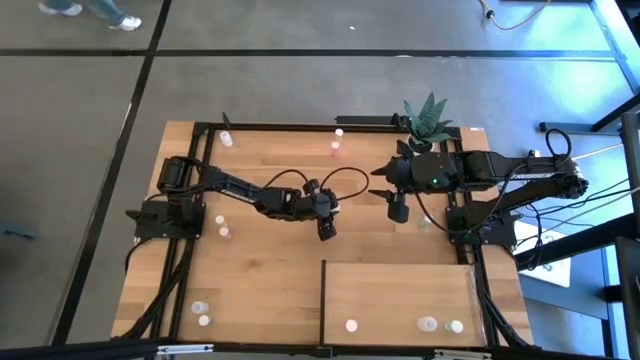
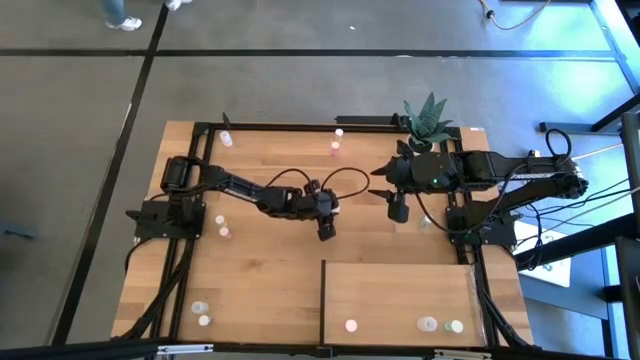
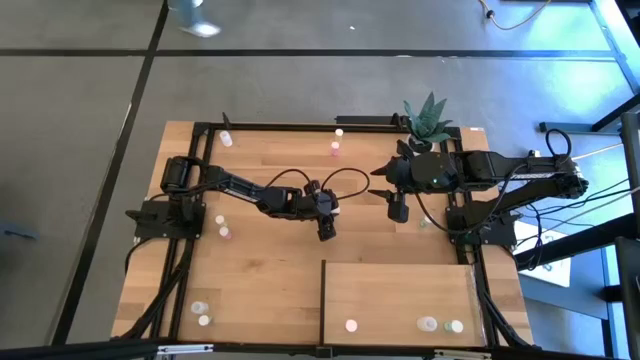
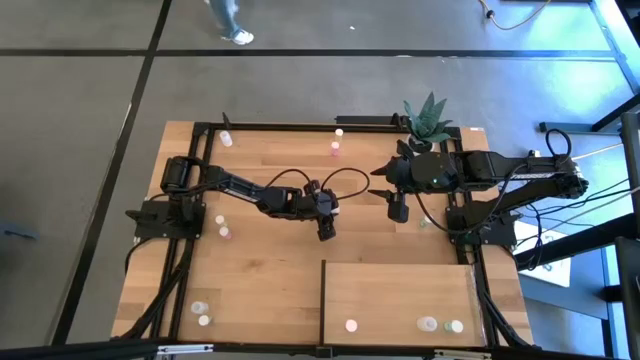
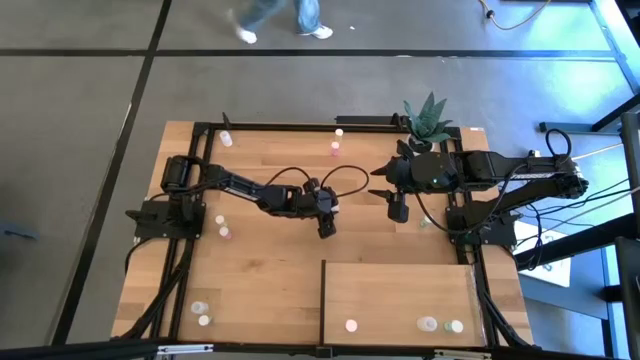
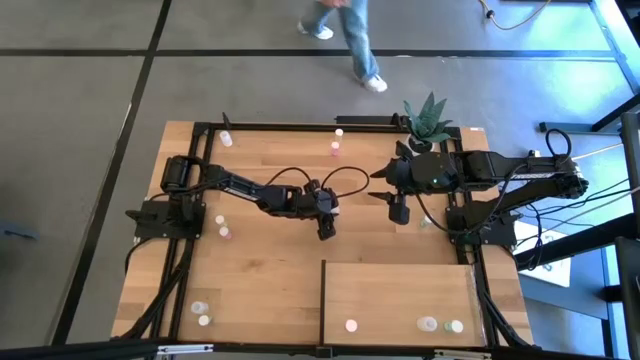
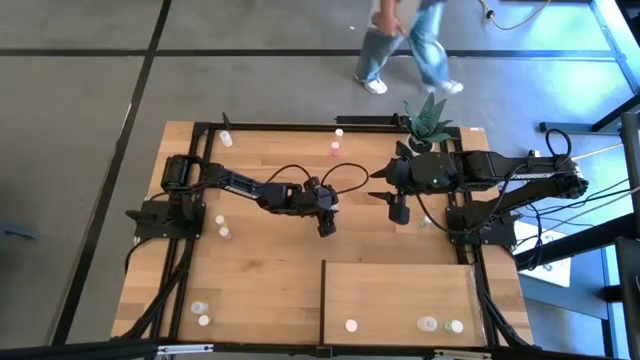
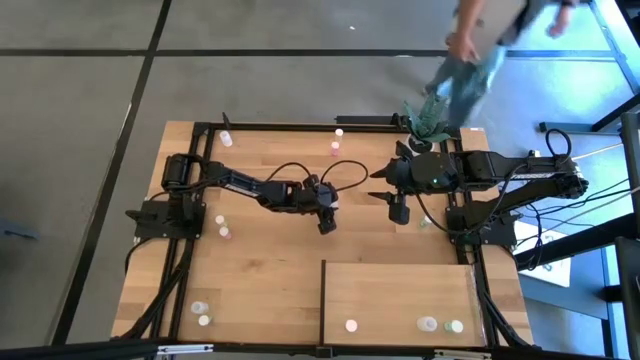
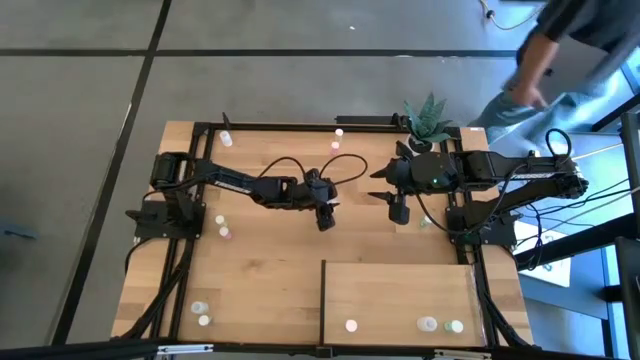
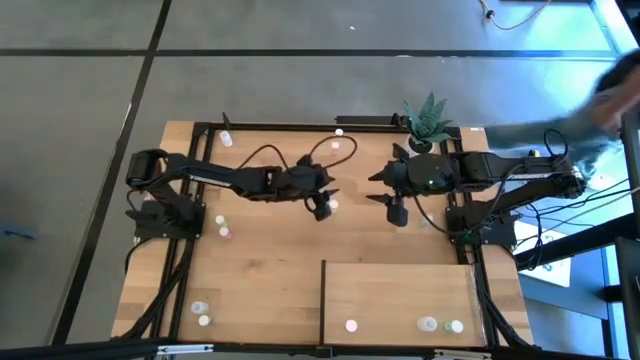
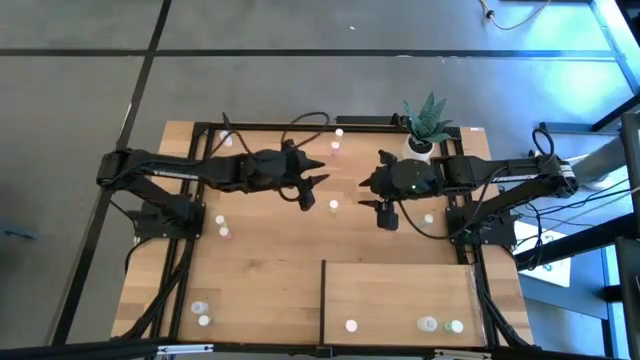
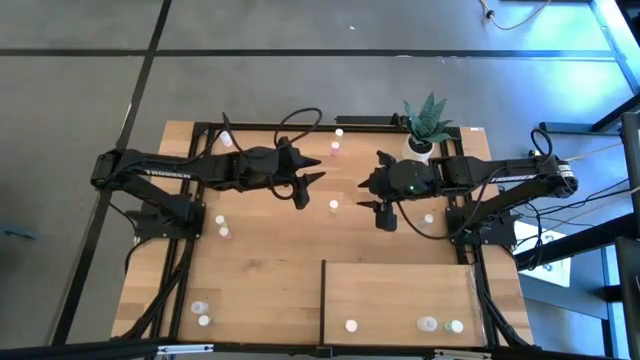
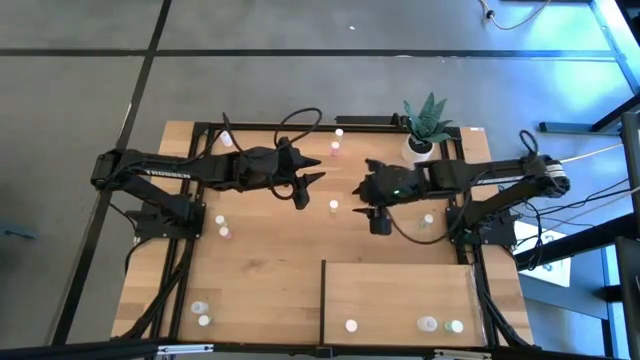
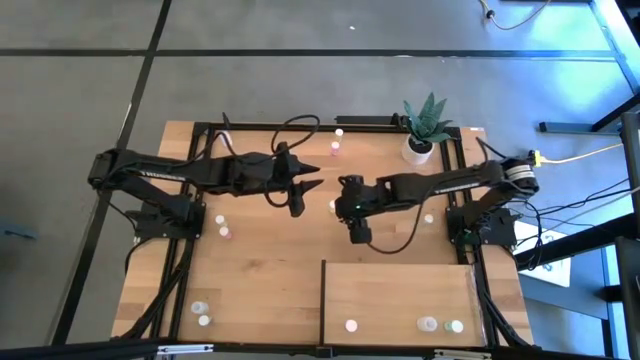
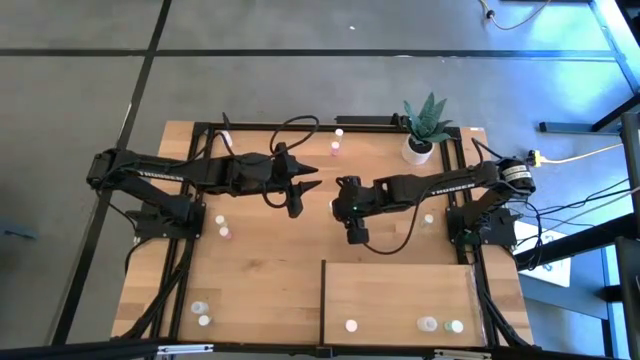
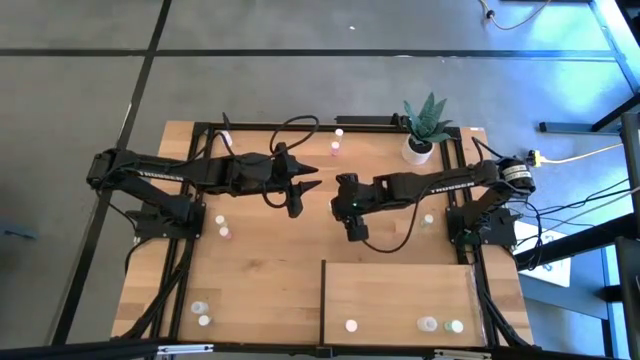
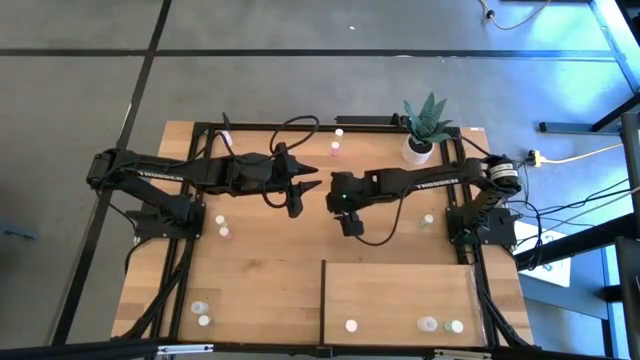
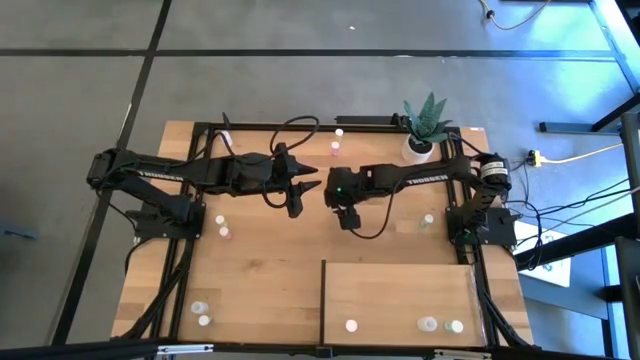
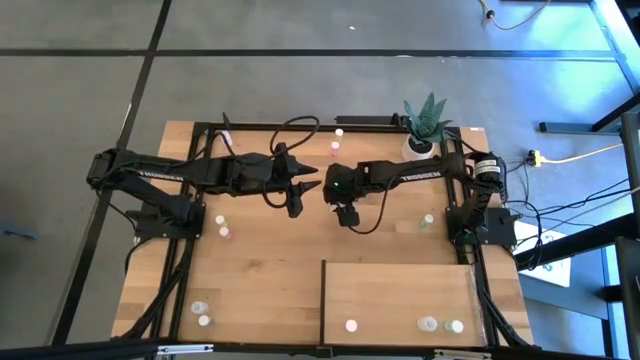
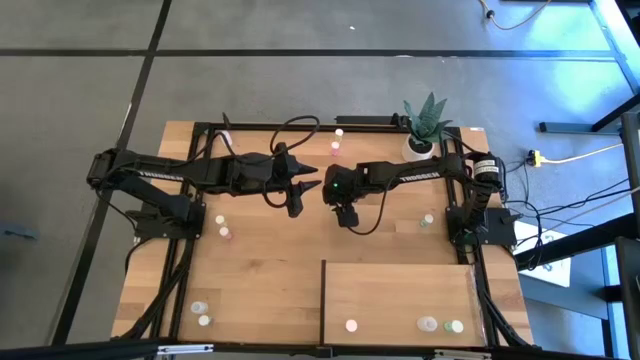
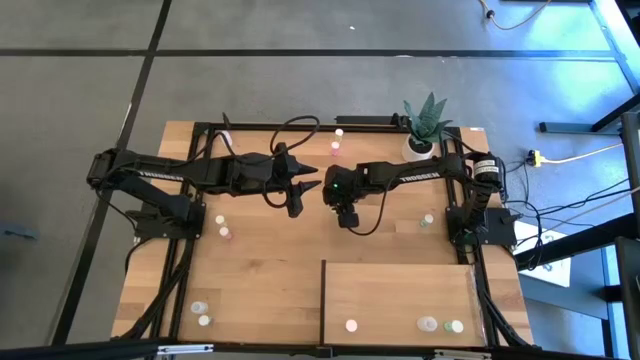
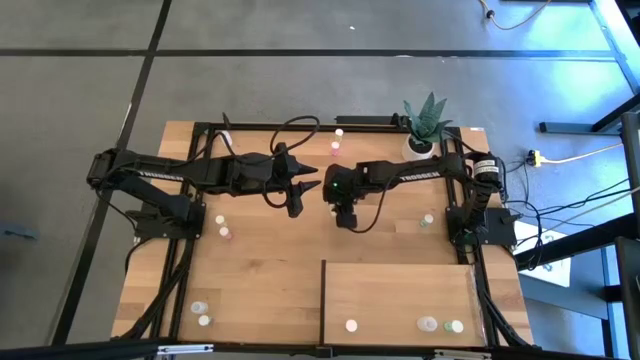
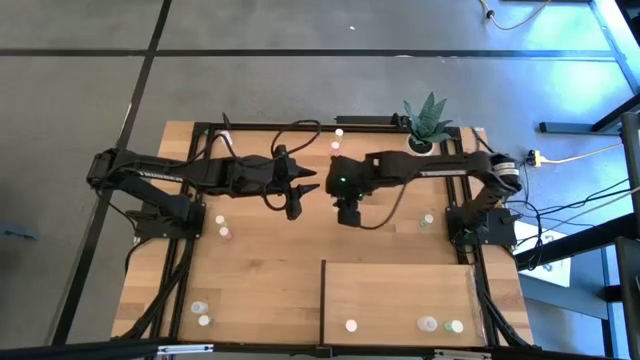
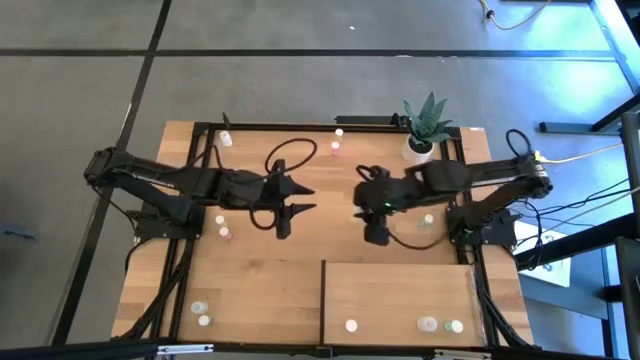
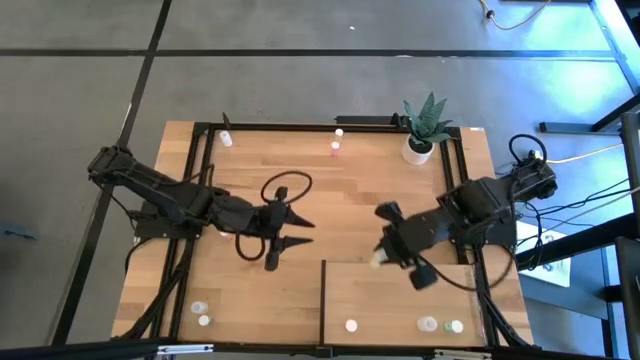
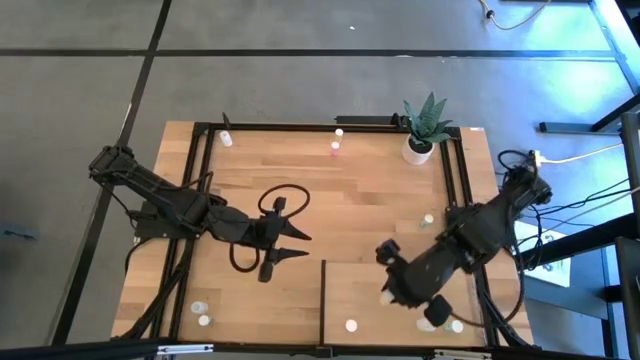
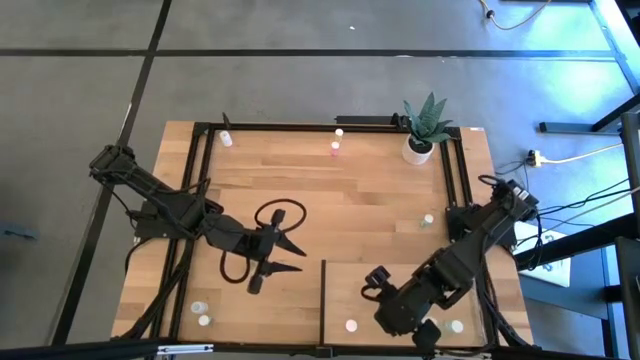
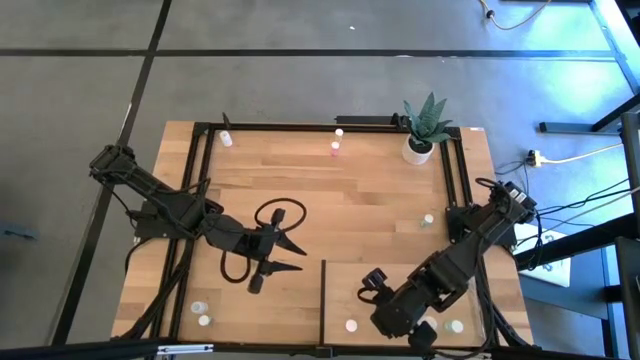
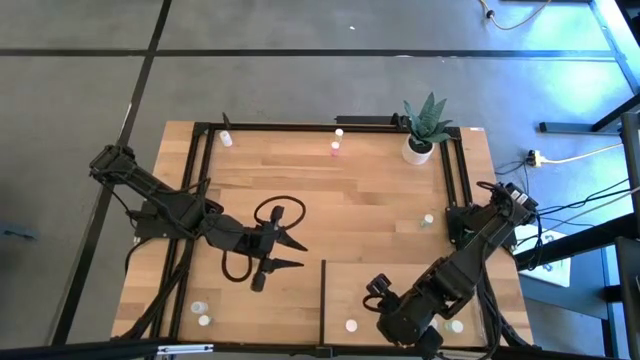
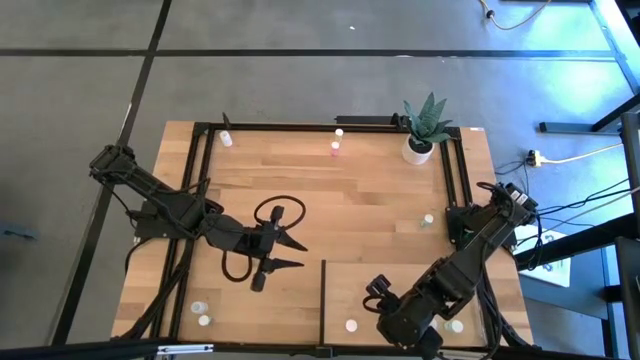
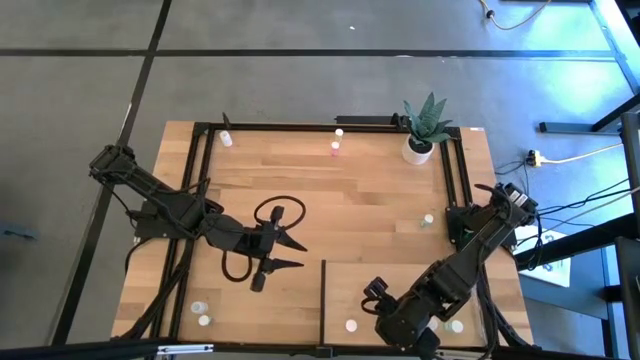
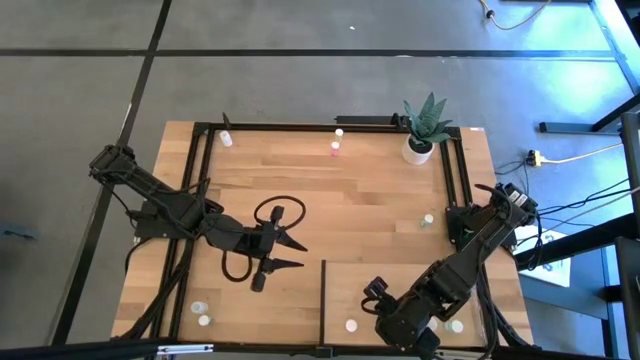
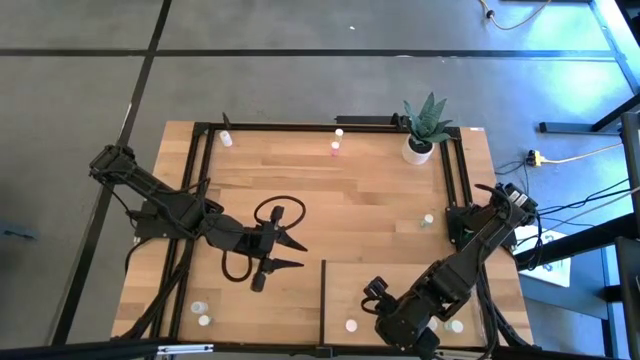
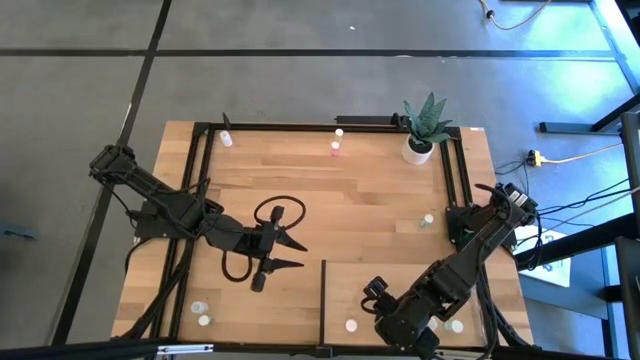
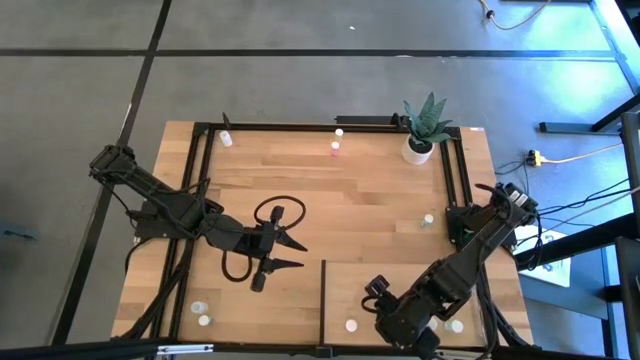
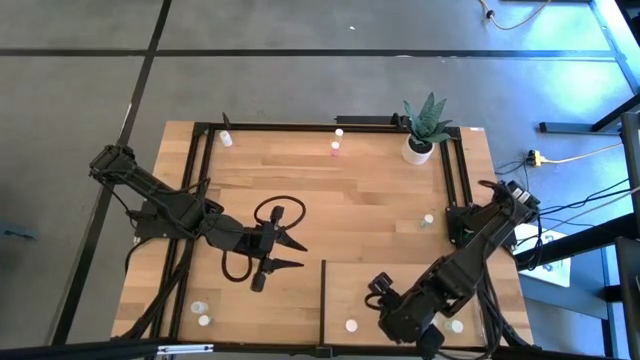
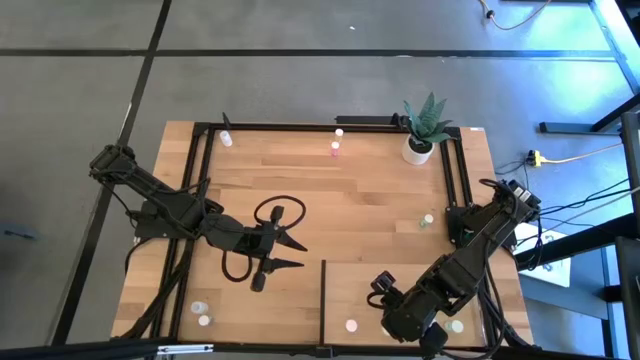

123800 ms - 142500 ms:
Task: Pick and place medicine bottles onto shelf by color
Put the bottom yellow pill bottle on the shelf

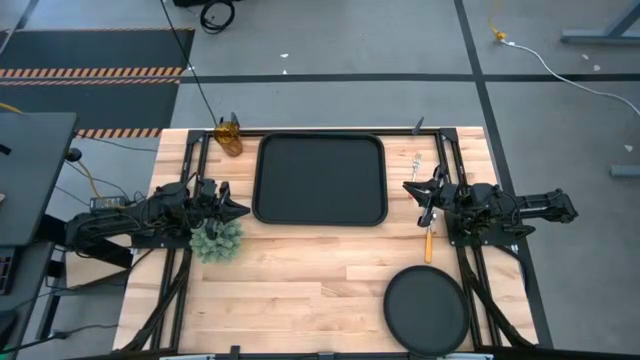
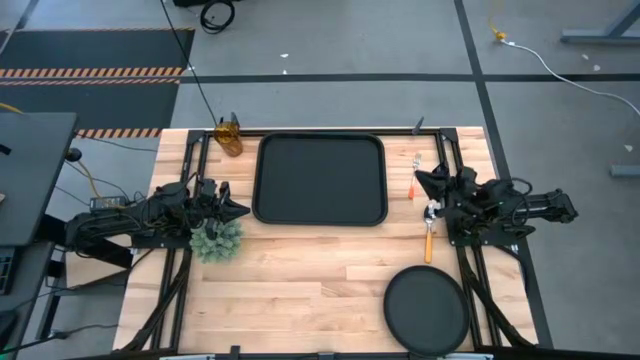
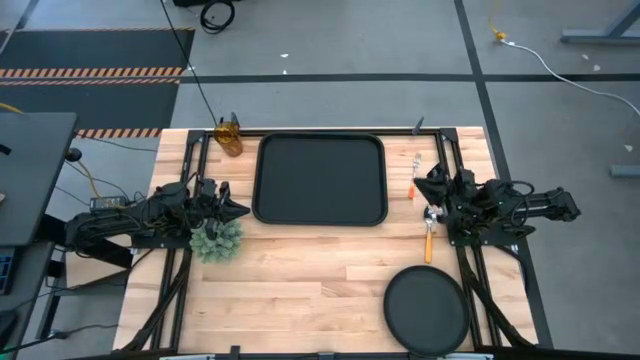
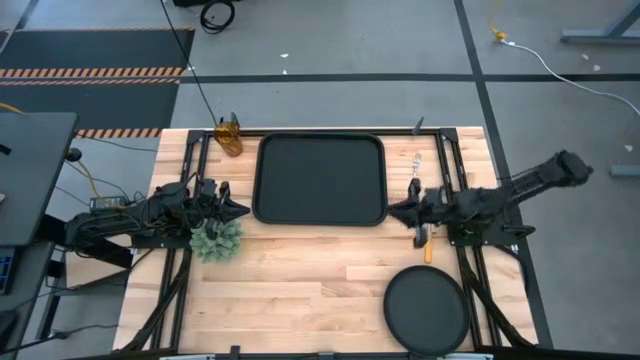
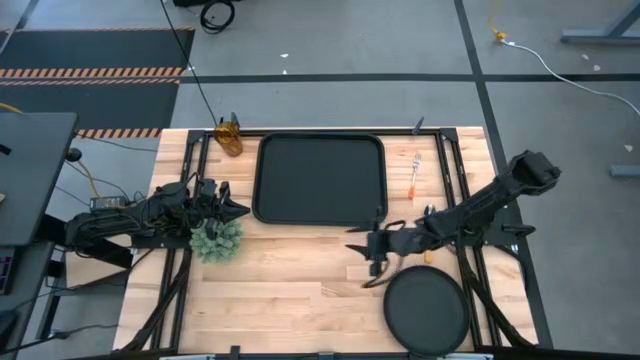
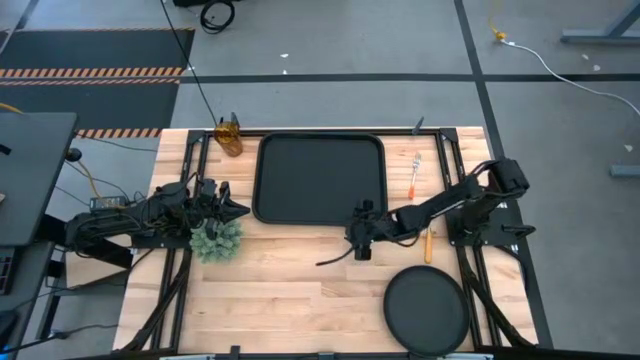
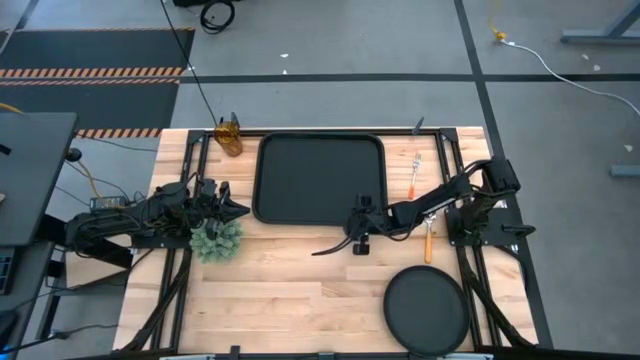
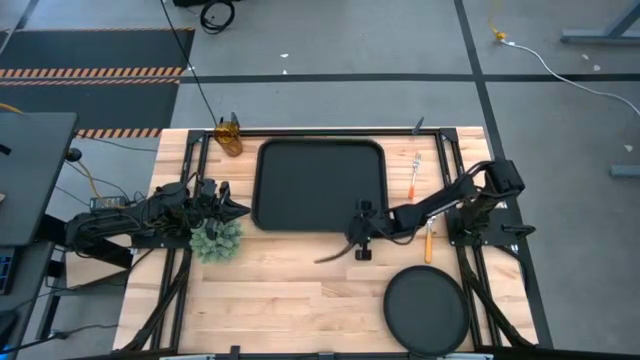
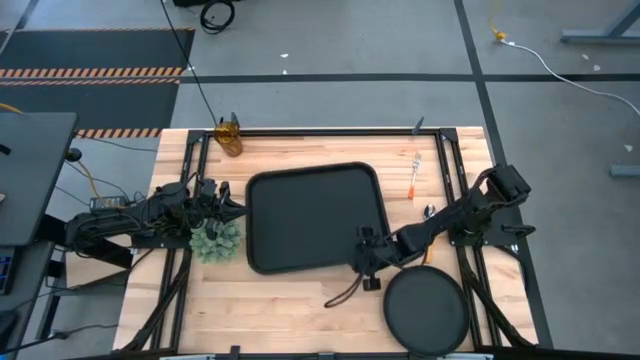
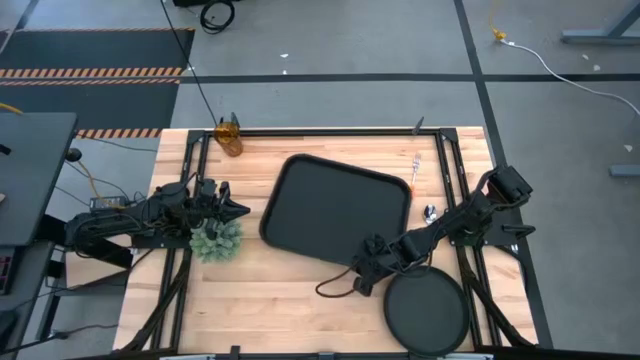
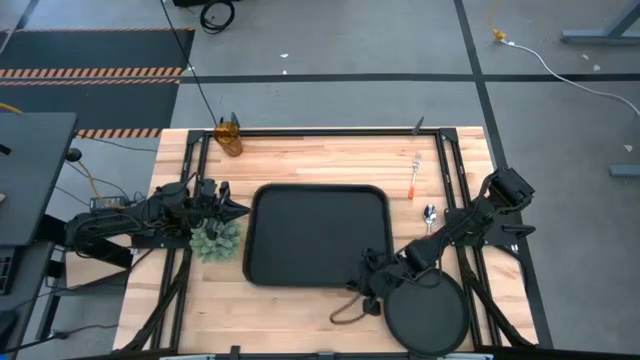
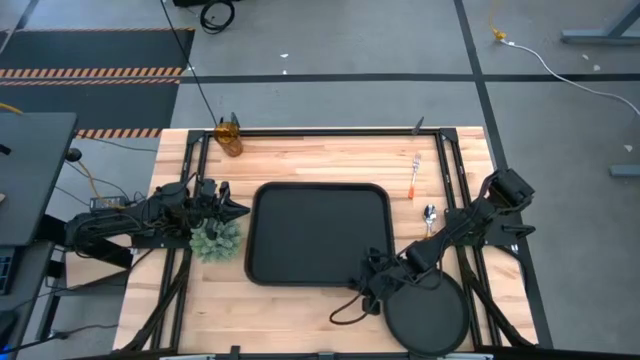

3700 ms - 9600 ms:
Task: Pick and place plate/cup/fork/spoon on tray
Move the serving tray to the center of the table
